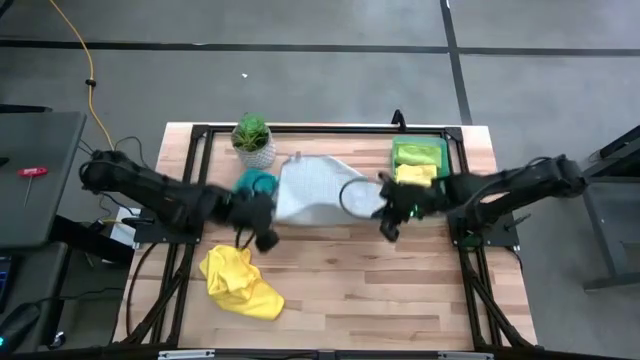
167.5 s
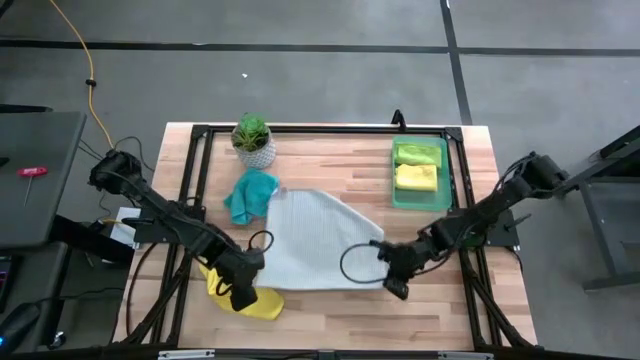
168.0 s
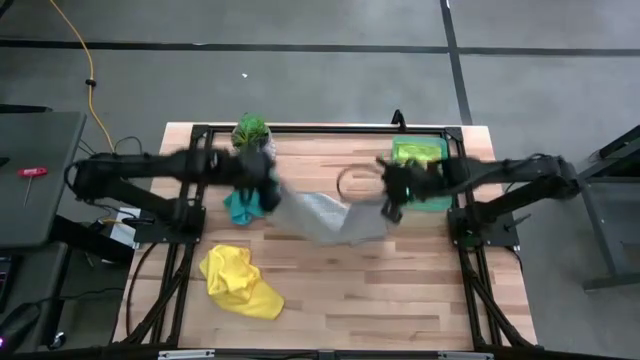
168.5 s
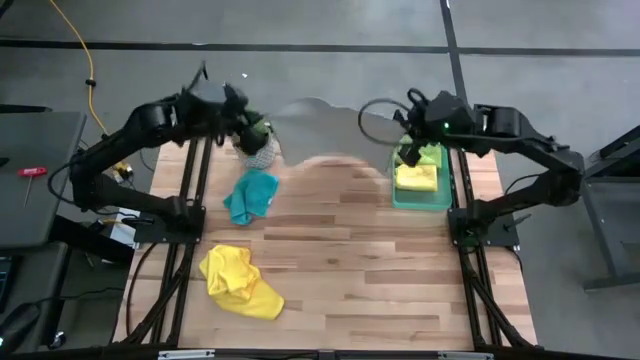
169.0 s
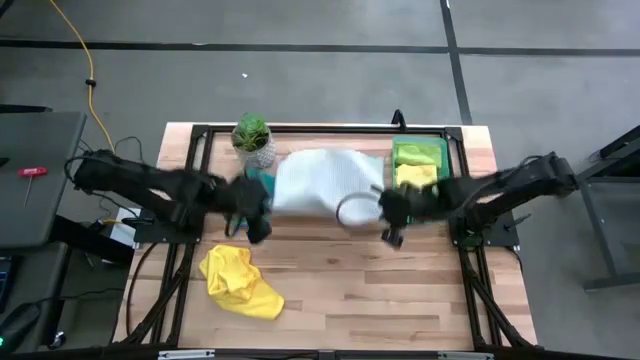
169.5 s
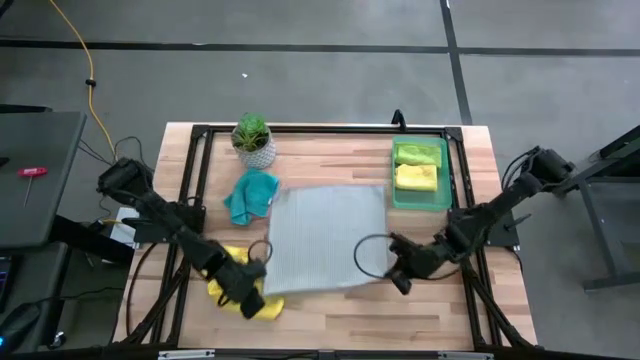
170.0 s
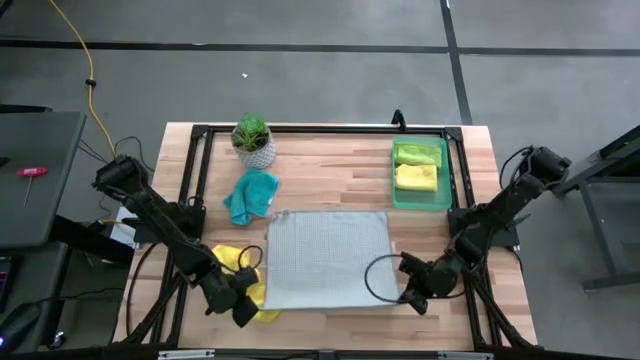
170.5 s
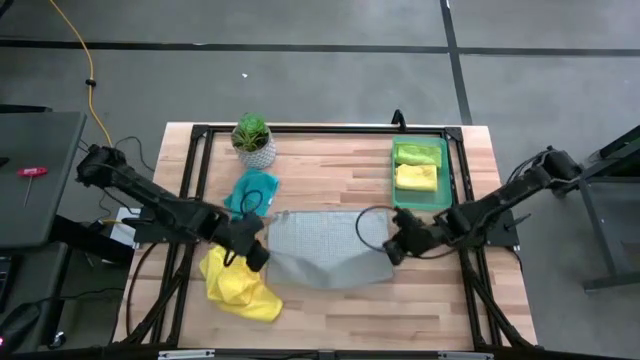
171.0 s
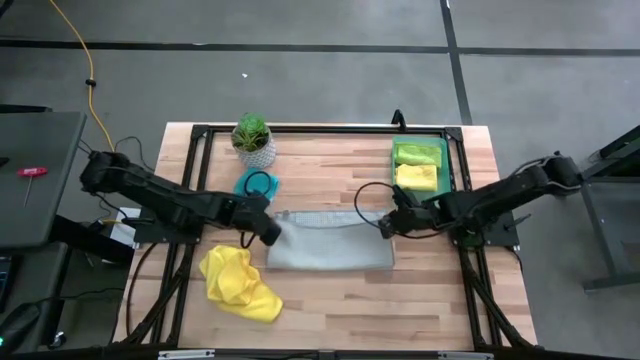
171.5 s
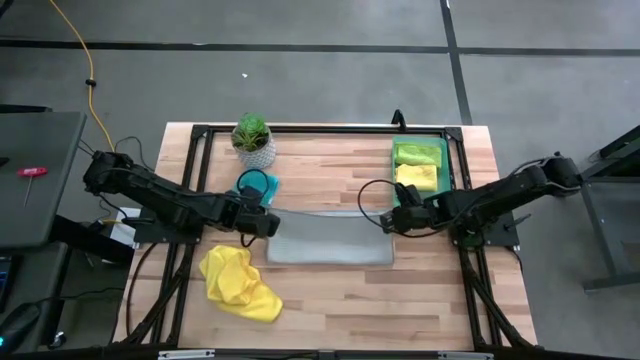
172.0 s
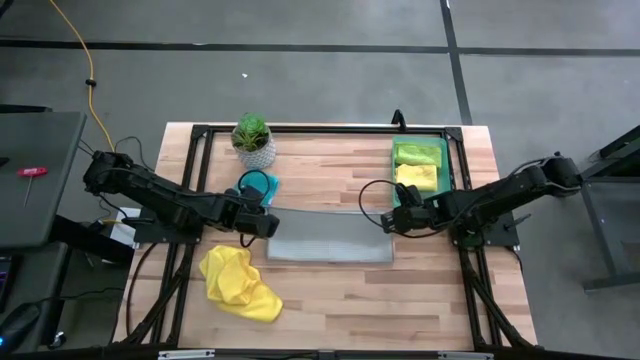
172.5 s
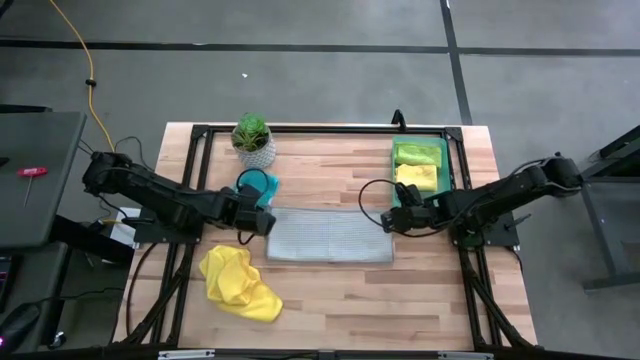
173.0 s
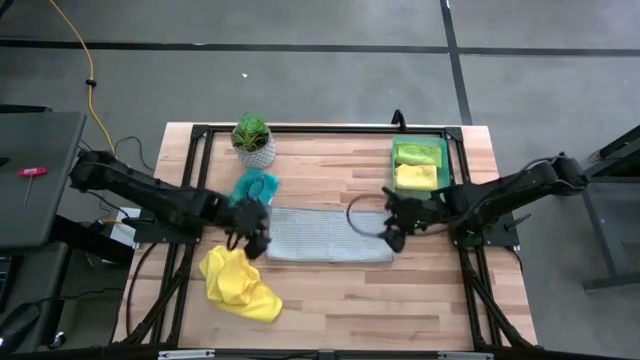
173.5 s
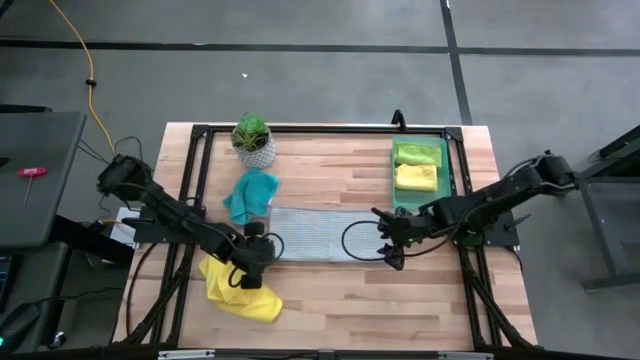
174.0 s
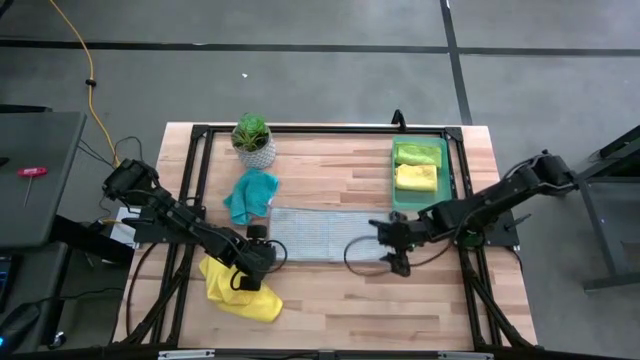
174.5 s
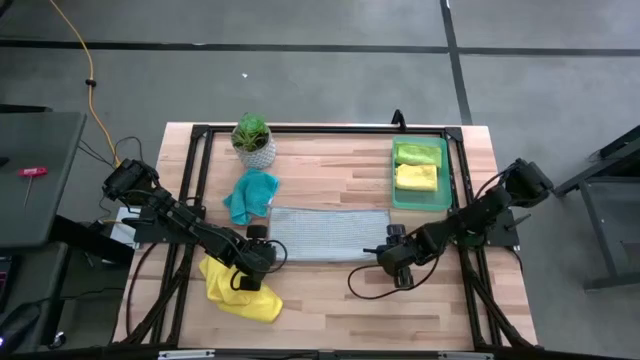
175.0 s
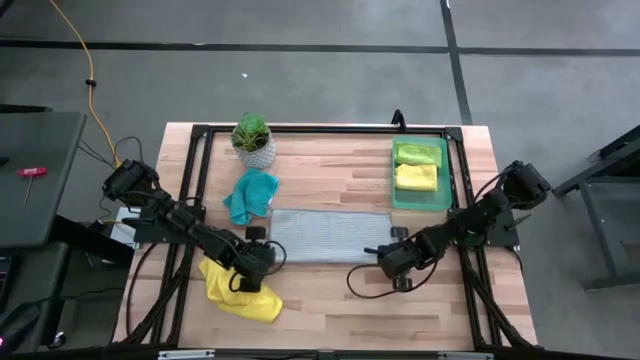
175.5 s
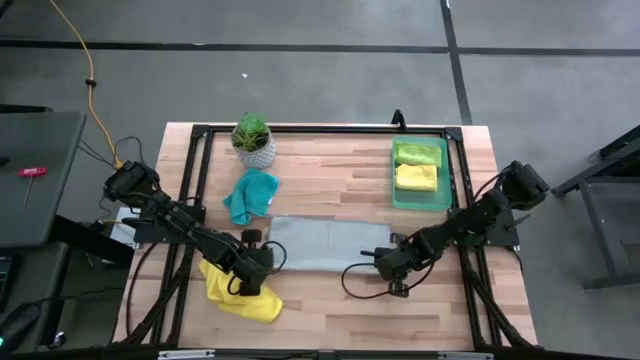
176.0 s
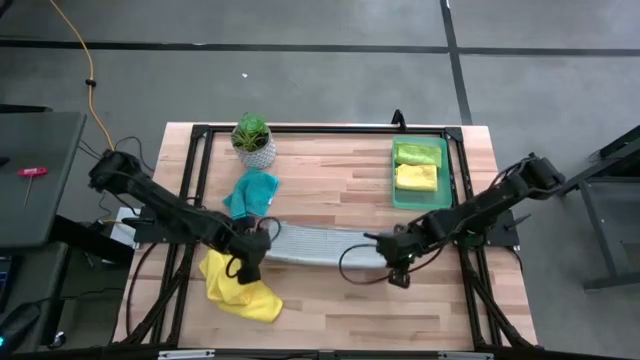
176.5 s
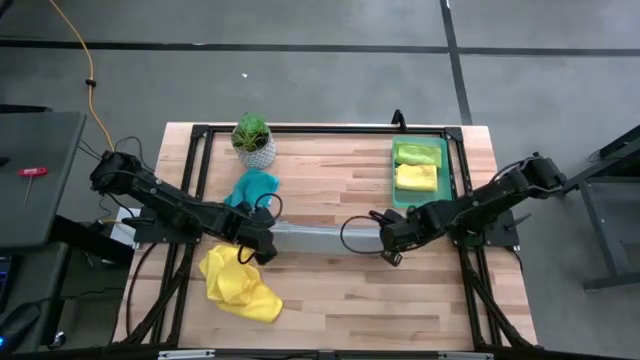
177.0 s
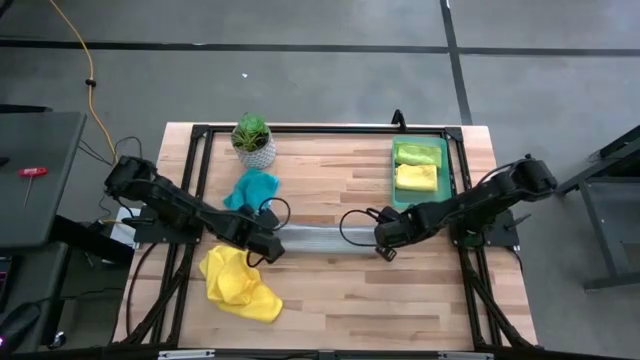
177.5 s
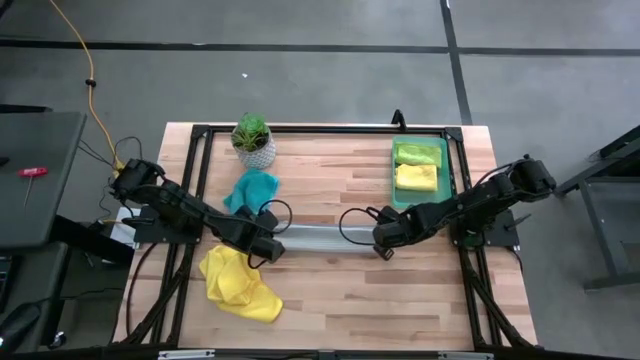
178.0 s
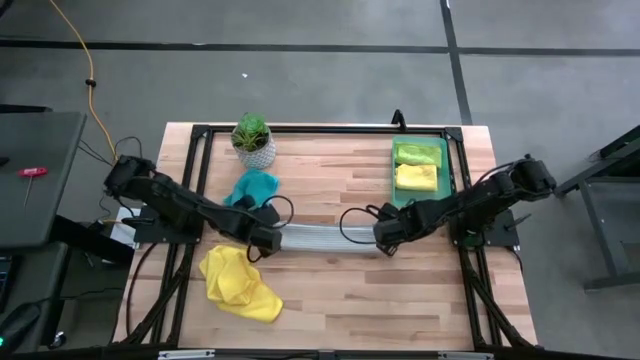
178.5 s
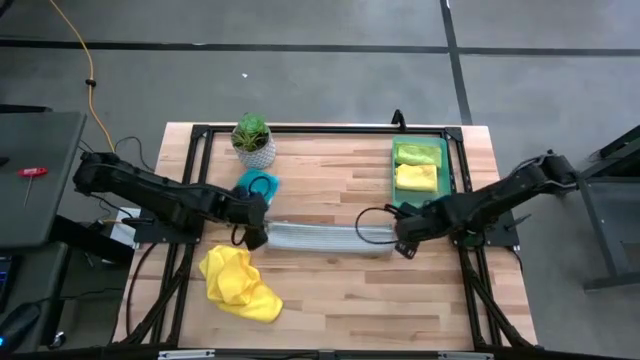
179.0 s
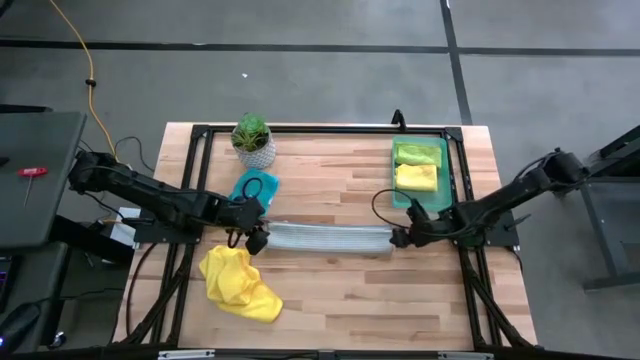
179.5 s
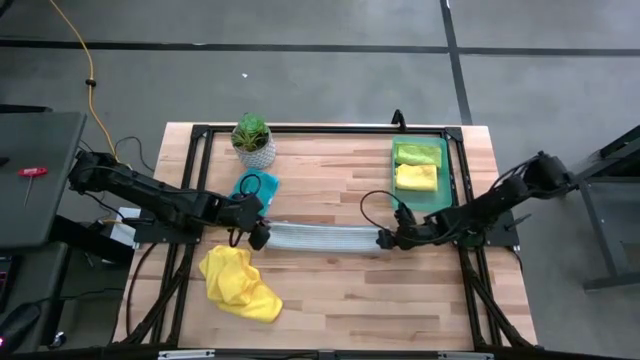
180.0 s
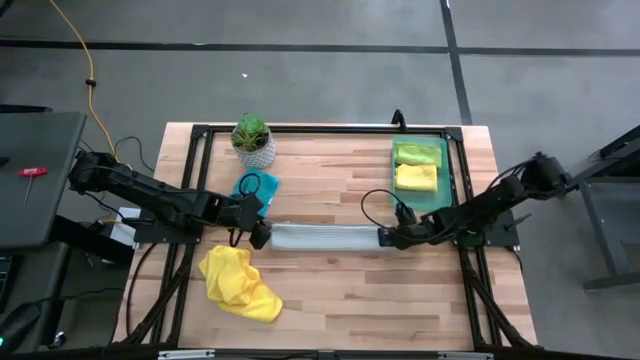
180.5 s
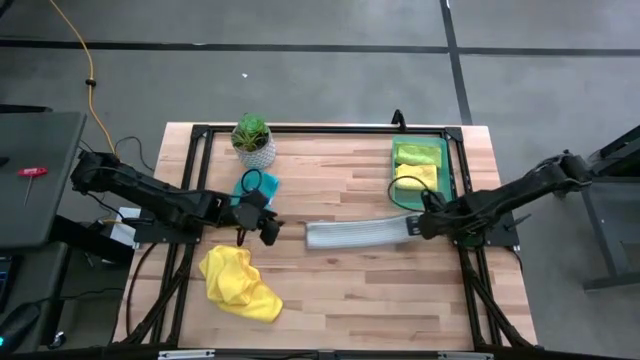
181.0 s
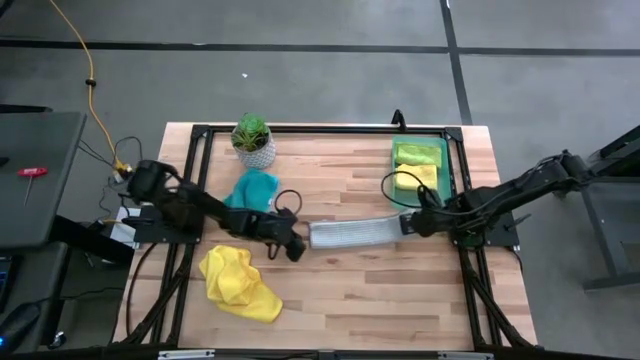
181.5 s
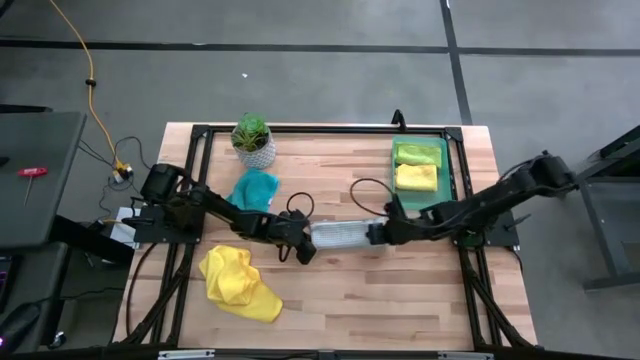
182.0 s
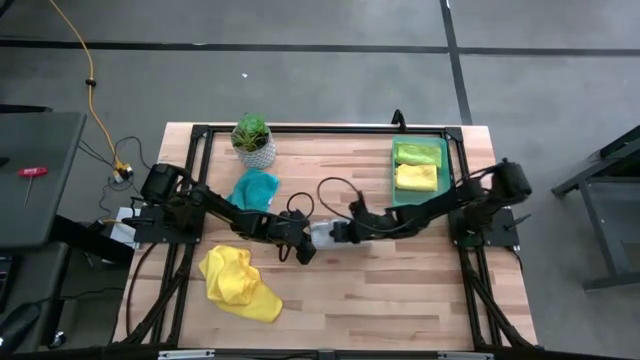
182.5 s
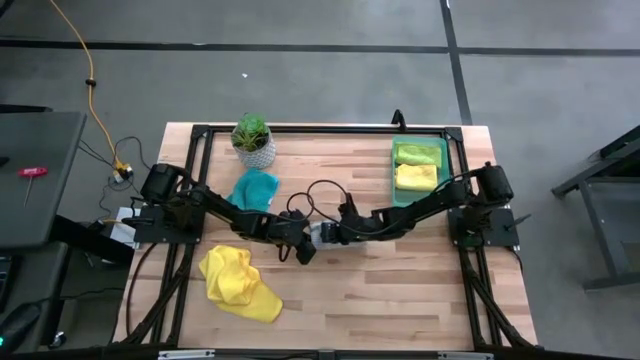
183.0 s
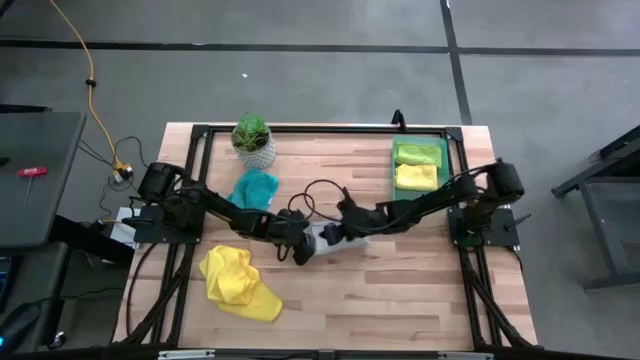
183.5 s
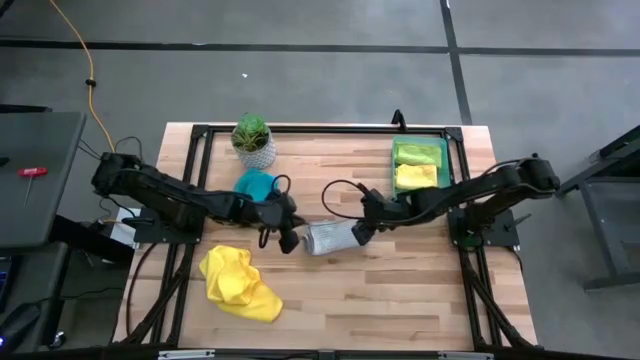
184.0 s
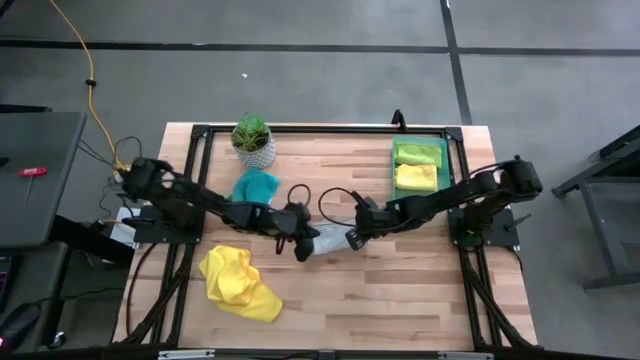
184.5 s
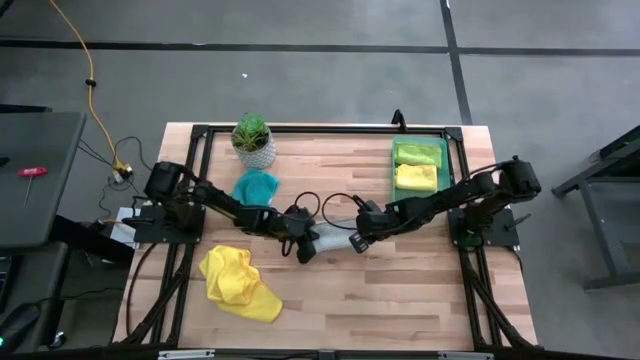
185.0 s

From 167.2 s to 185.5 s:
Task: Fold microfiber towels
Fold the gray microfiber cloth

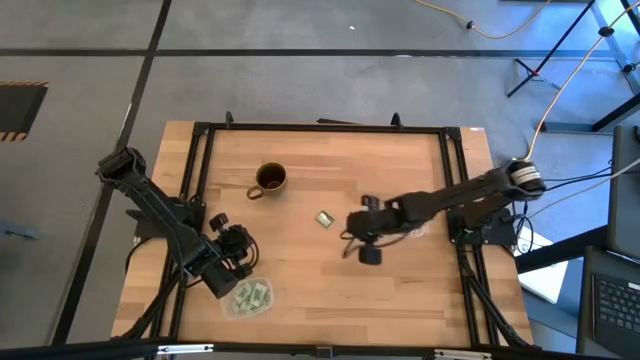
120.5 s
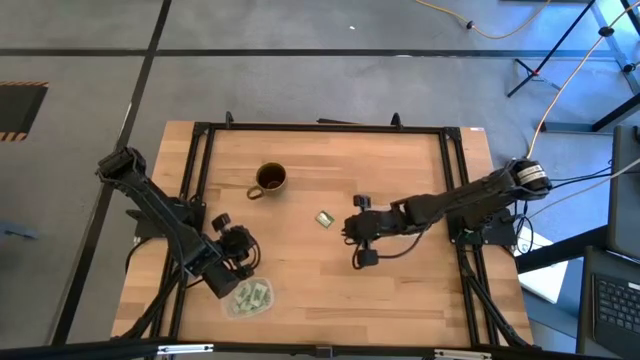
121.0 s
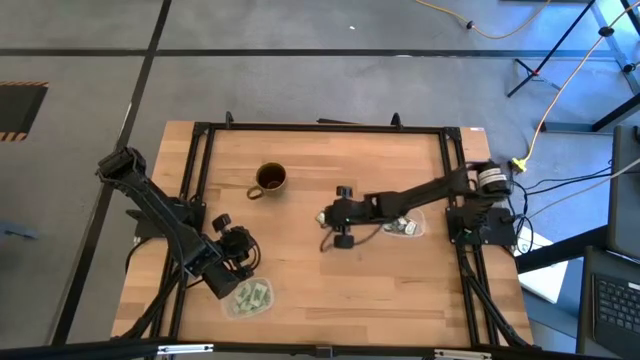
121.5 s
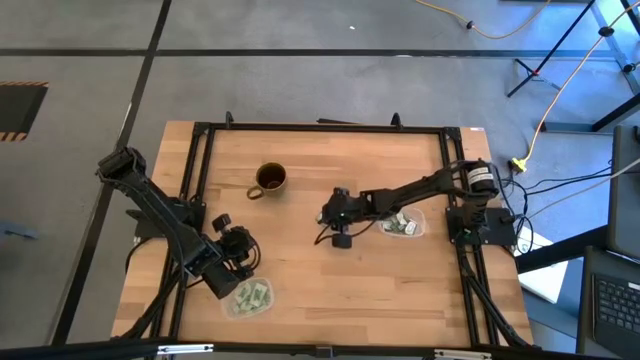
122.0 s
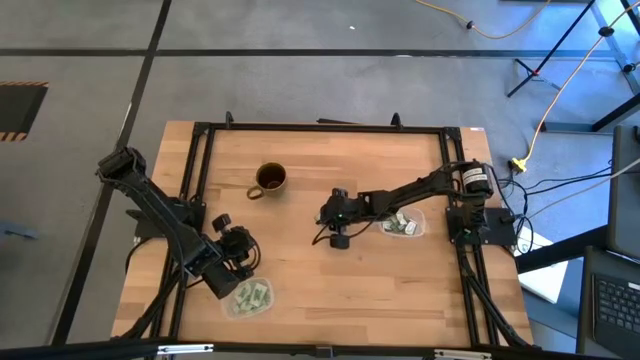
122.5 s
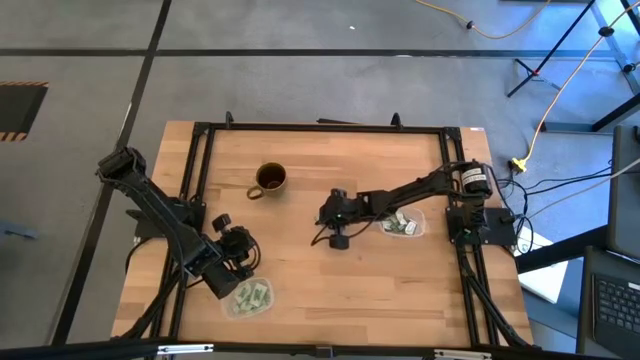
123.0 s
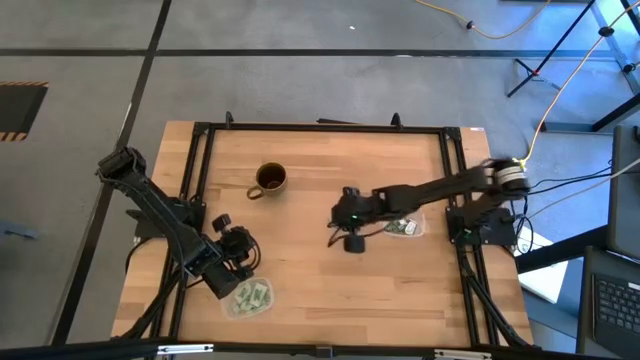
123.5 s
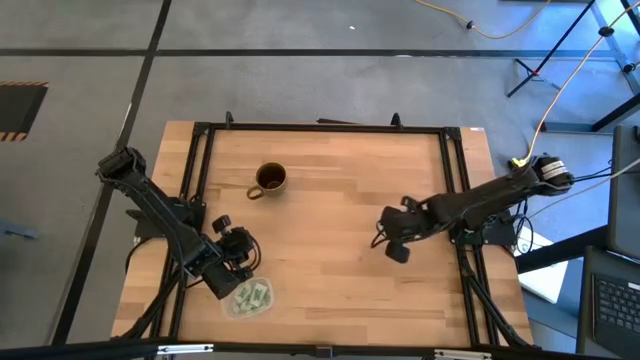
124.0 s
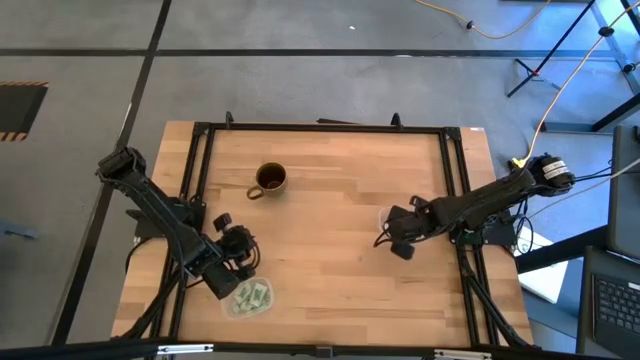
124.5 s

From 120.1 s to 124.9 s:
Task: Pick and place Stevia / Truvia into bins
Put the truvia packet into the top transparent container
